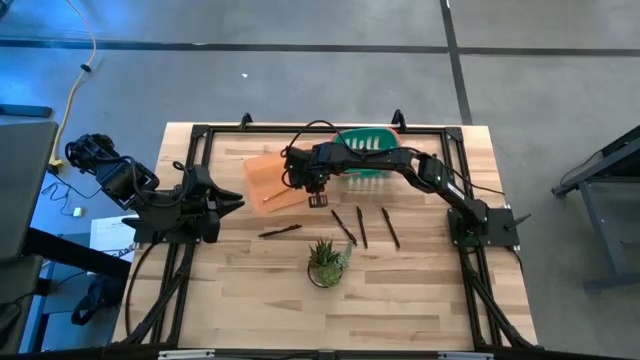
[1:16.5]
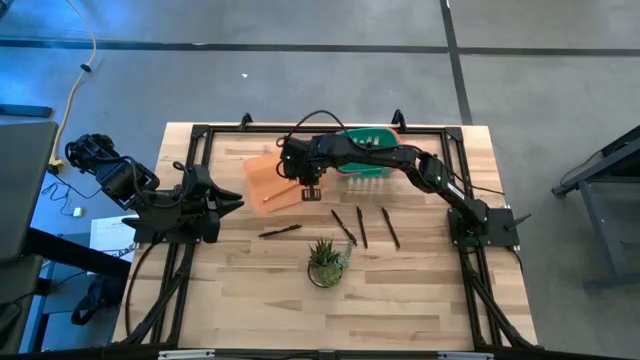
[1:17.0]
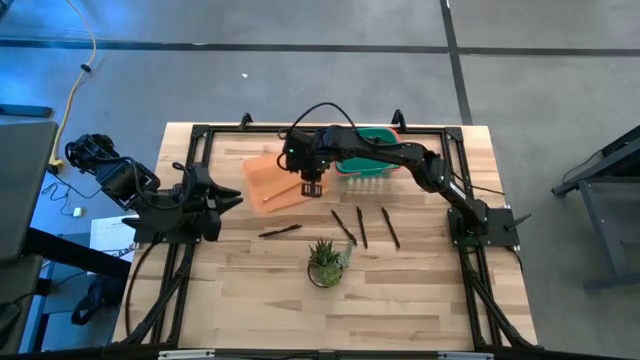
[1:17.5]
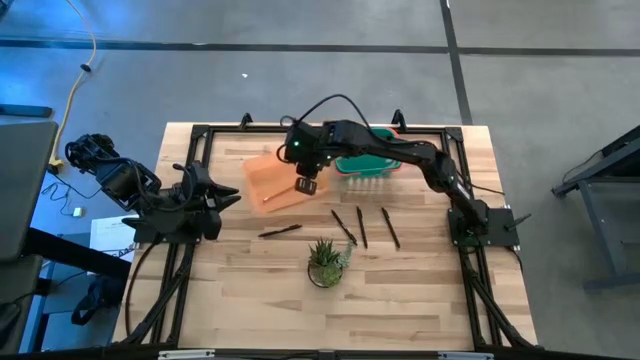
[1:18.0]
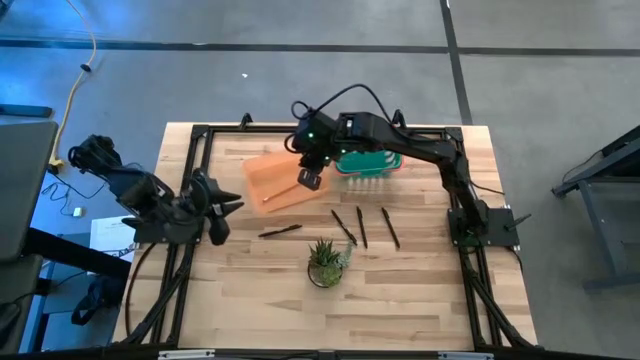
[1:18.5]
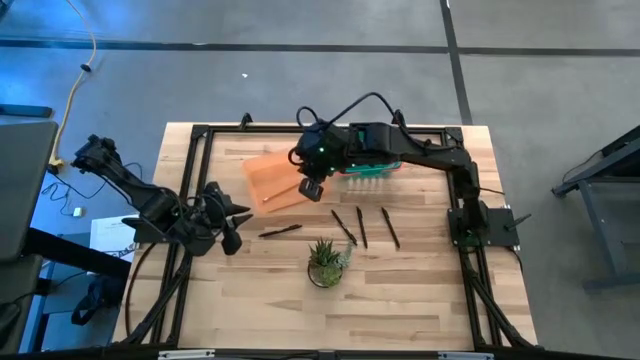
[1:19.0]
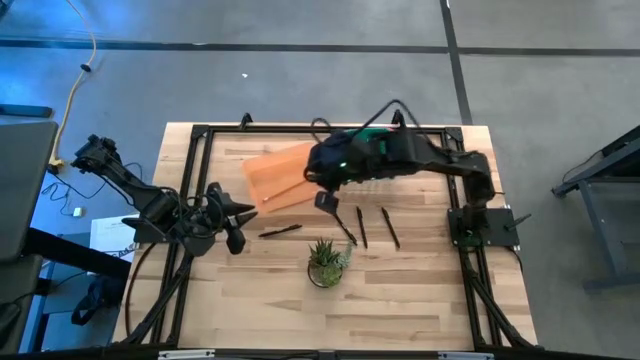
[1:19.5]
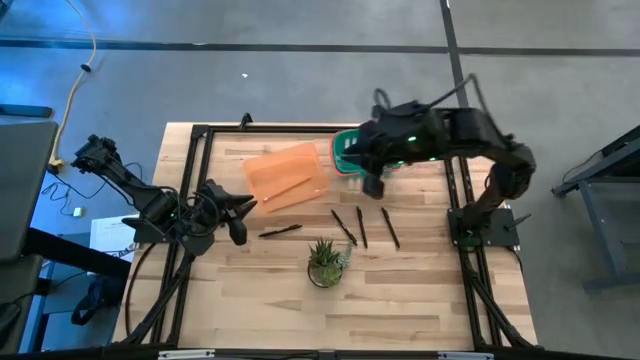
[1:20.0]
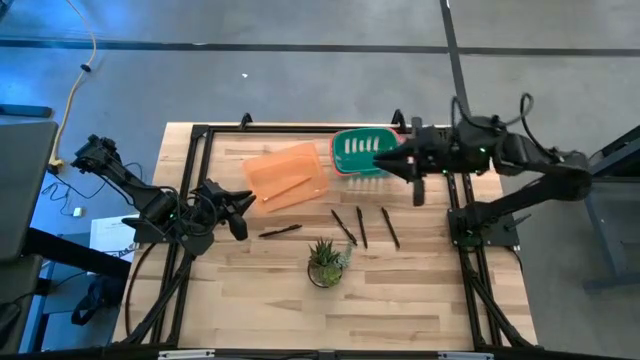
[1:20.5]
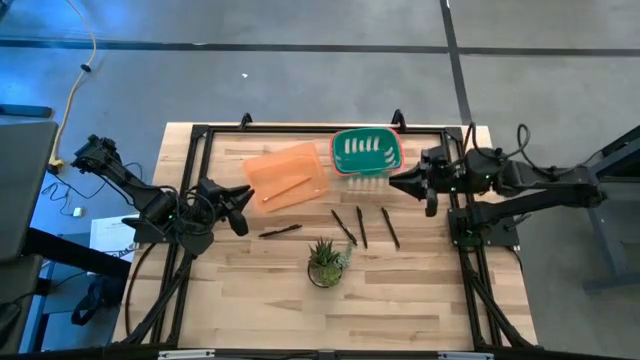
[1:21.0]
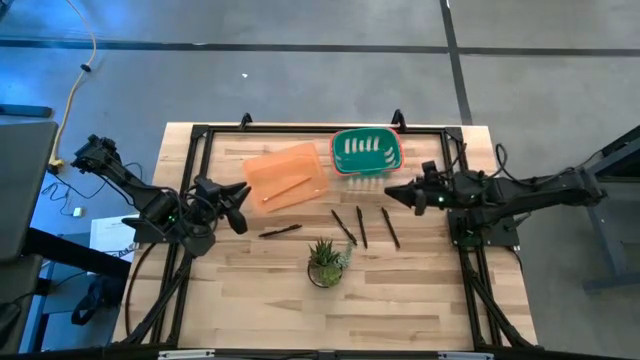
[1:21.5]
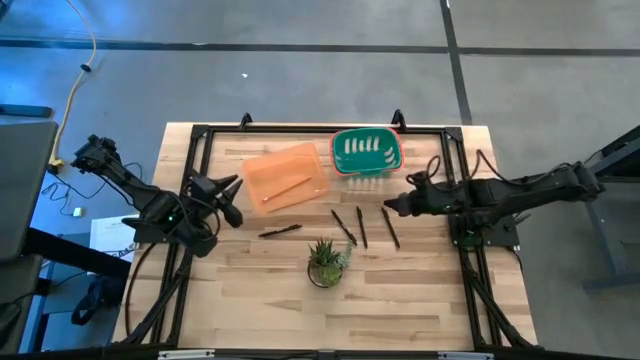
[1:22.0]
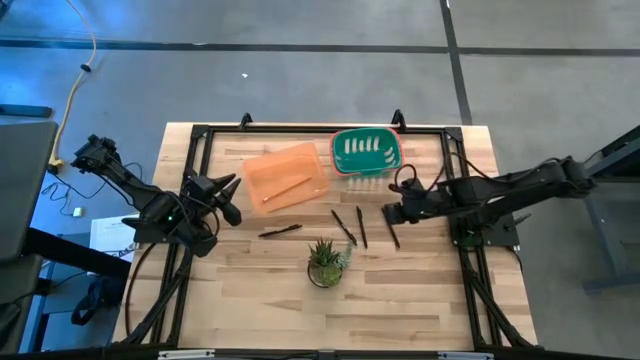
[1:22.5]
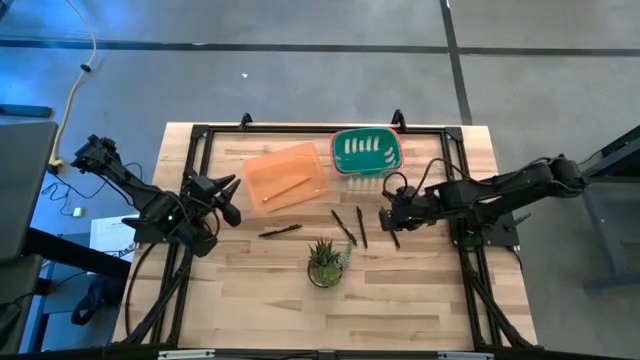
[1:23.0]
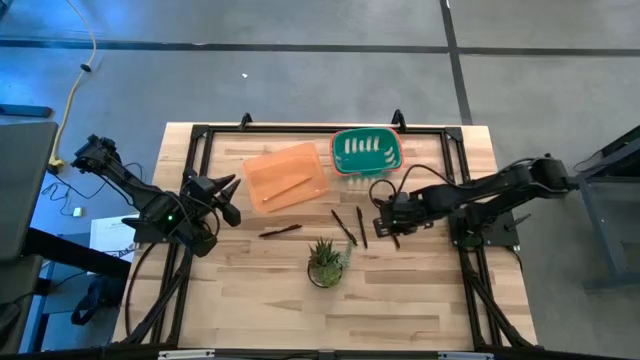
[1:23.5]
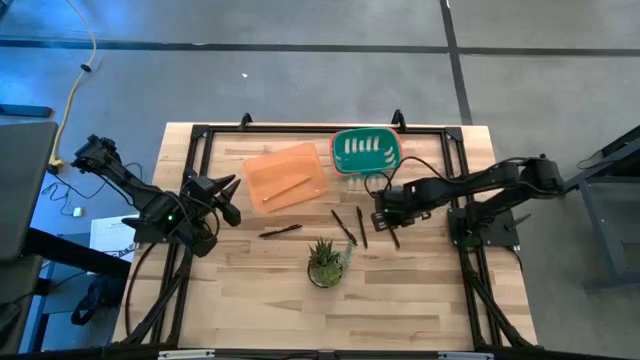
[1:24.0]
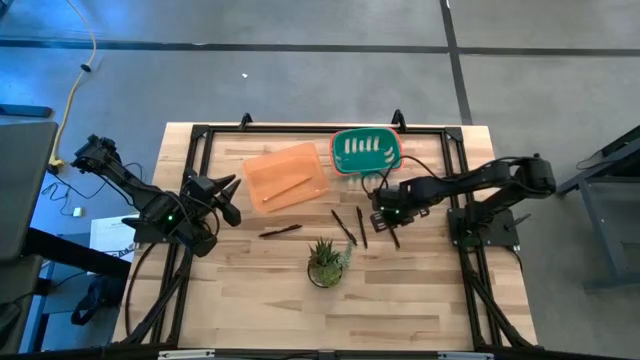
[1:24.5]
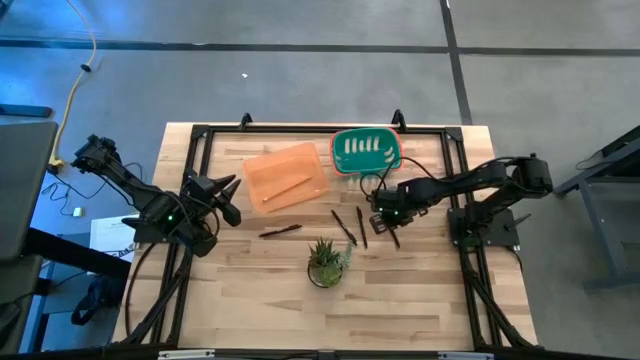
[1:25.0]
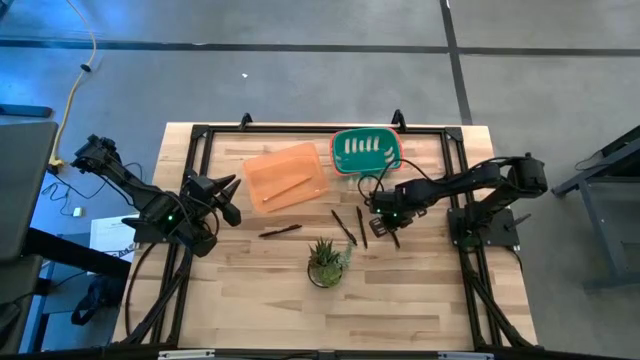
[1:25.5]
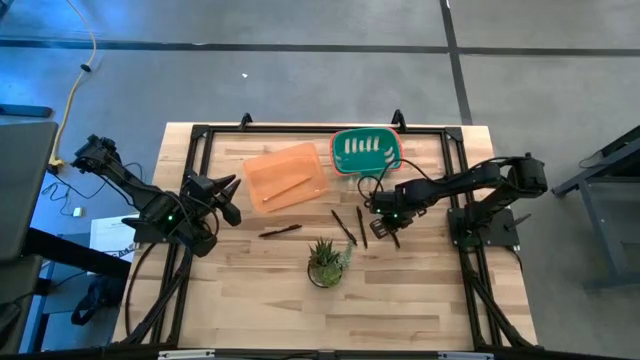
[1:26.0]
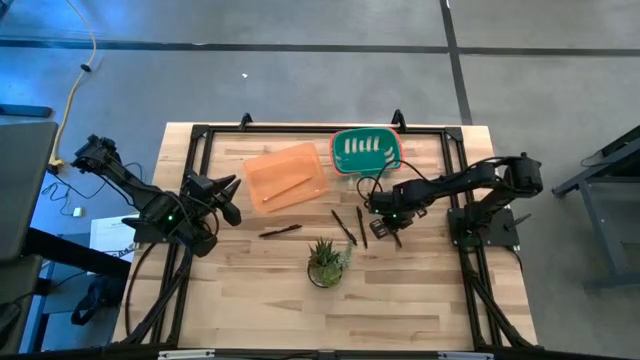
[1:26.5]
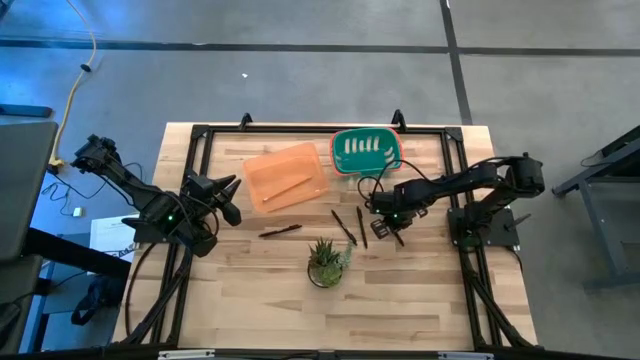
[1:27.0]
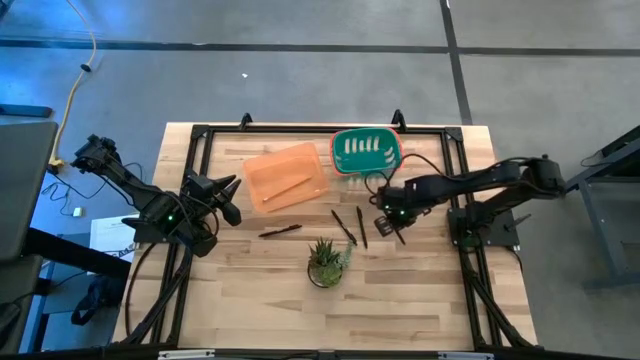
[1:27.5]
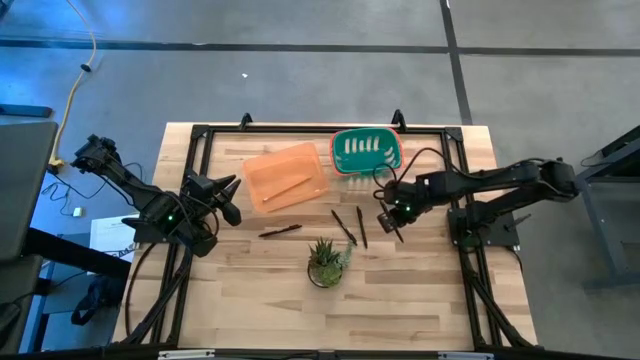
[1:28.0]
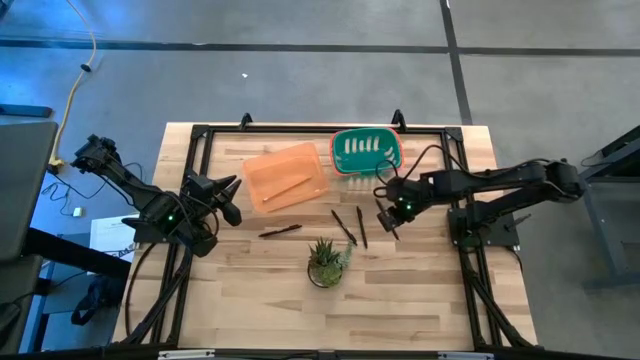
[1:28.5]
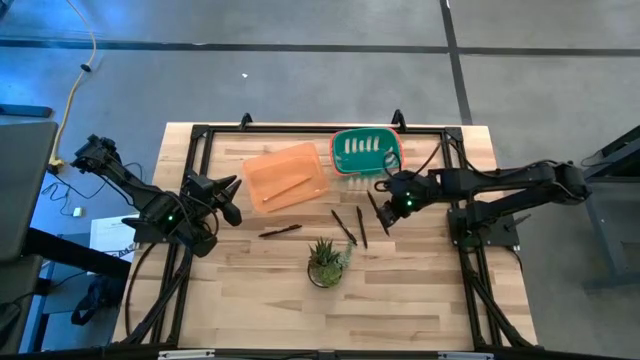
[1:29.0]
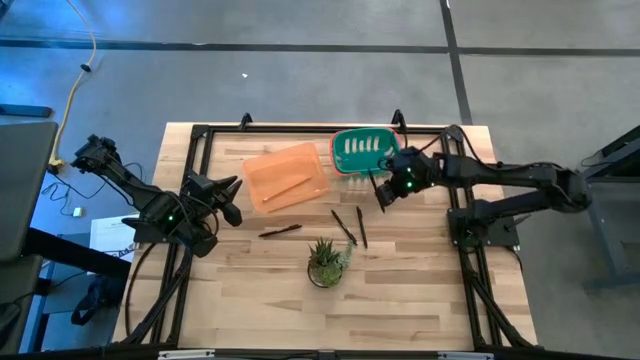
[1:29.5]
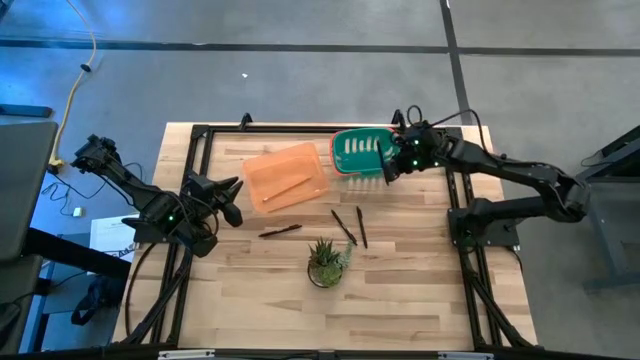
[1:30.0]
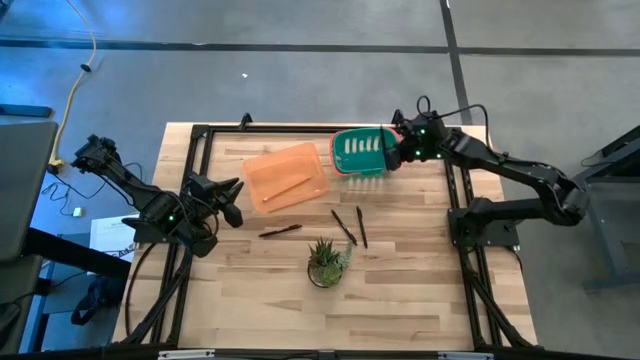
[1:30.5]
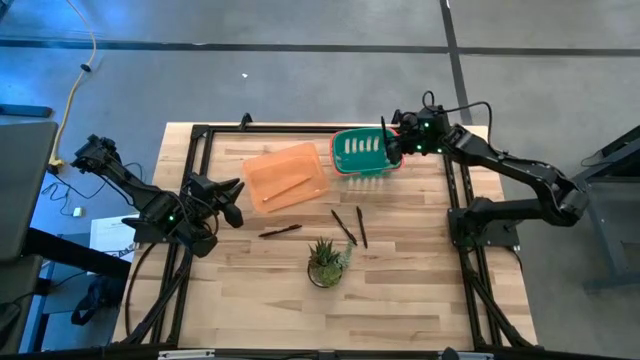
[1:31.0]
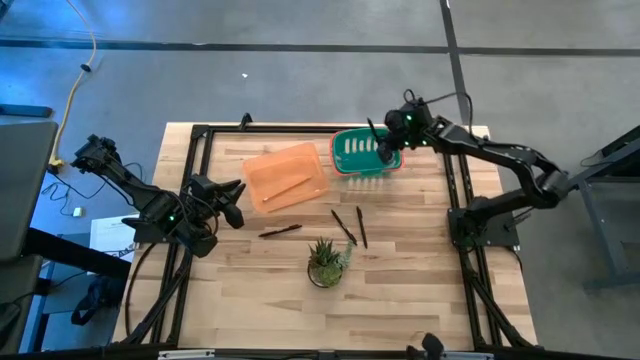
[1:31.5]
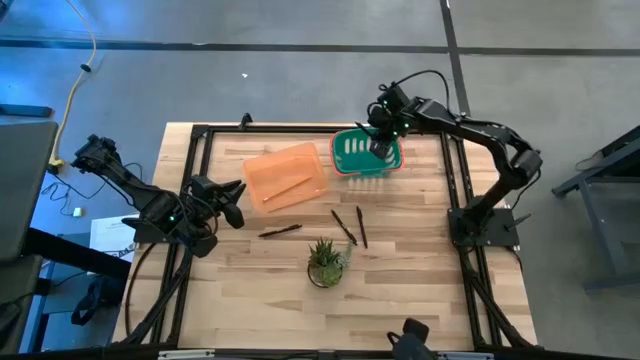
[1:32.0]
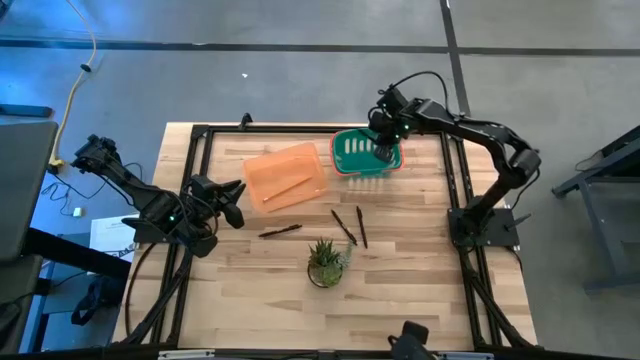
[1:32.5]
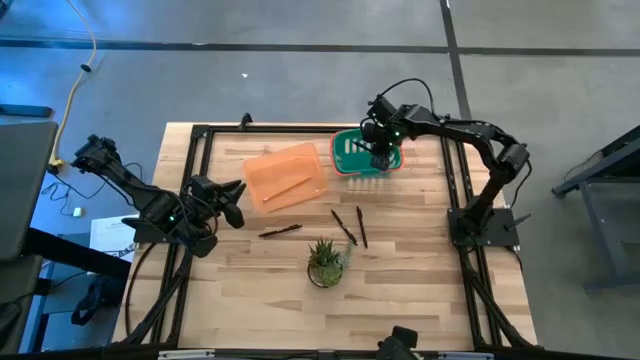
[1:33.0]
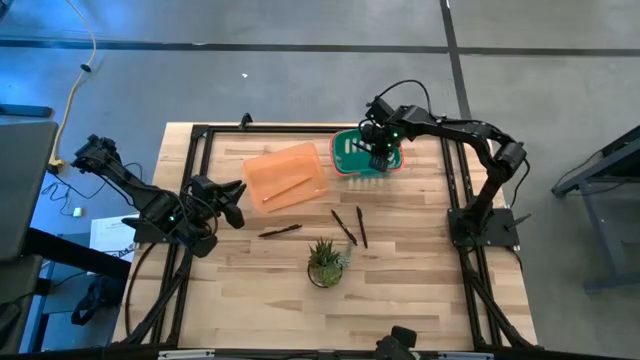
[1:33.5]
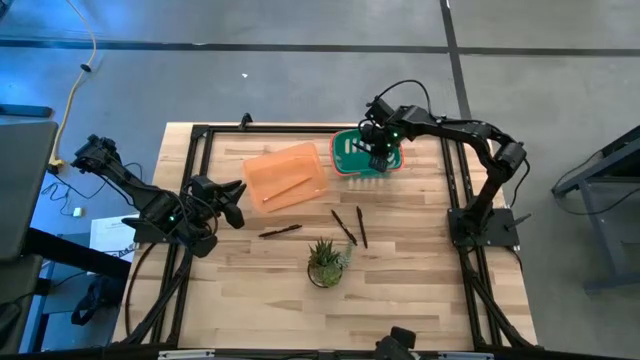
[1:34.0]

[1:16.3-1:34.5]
Task: Sort pens & pencils
Put the black pen into the green basket

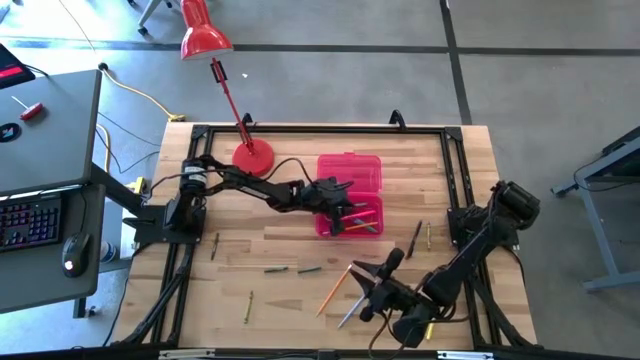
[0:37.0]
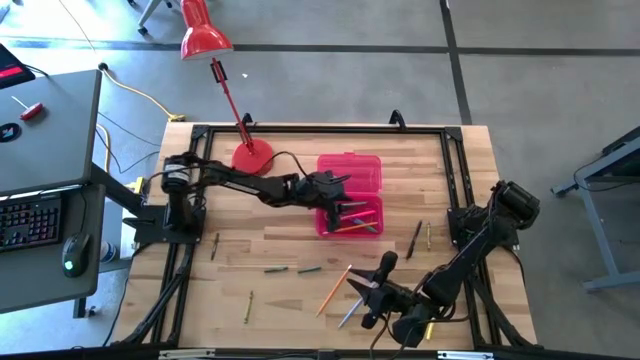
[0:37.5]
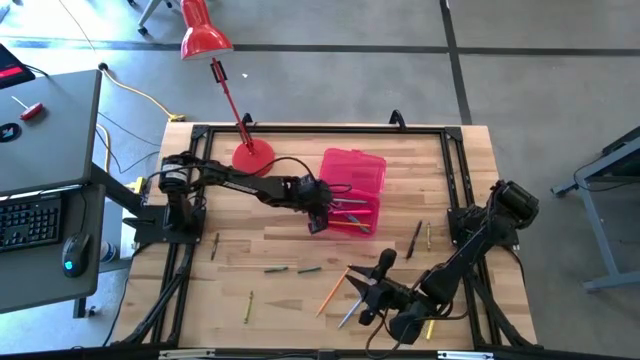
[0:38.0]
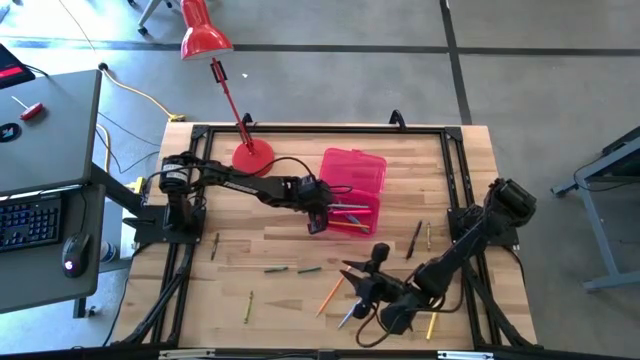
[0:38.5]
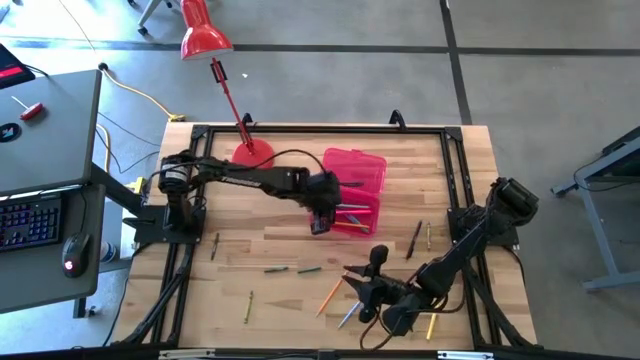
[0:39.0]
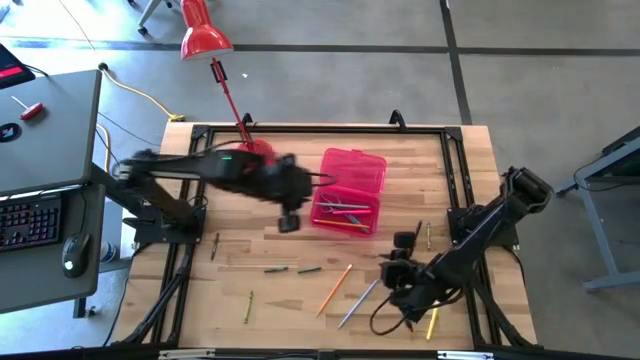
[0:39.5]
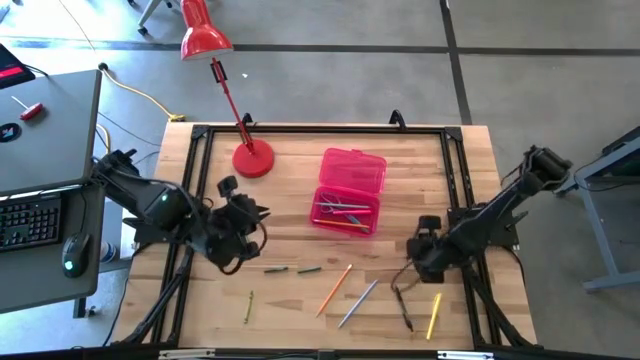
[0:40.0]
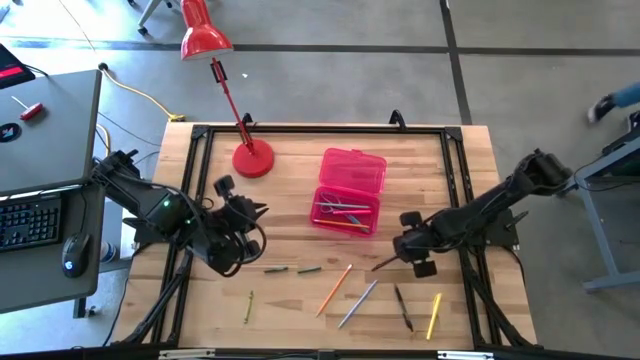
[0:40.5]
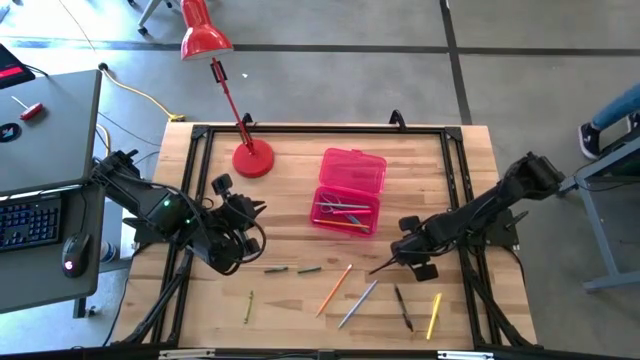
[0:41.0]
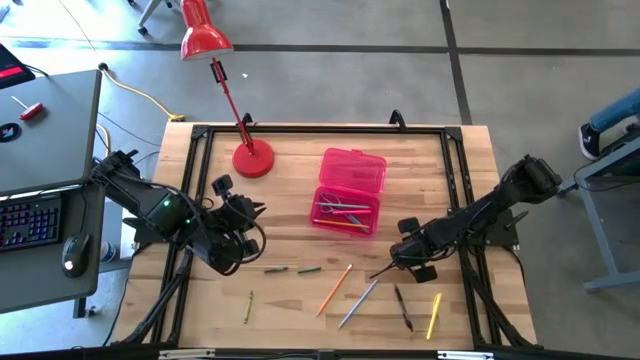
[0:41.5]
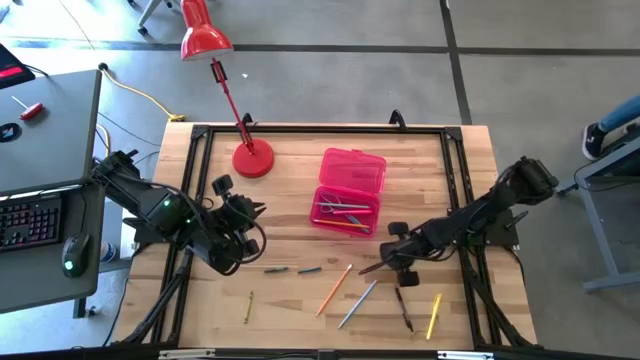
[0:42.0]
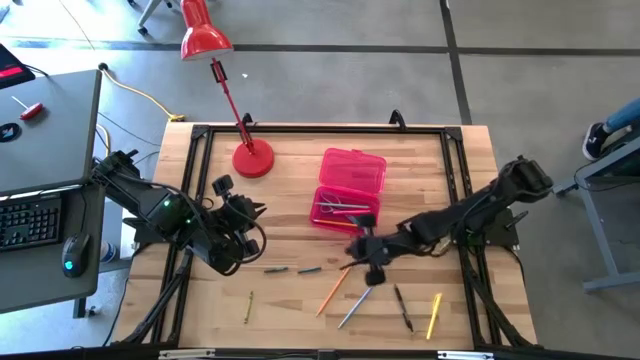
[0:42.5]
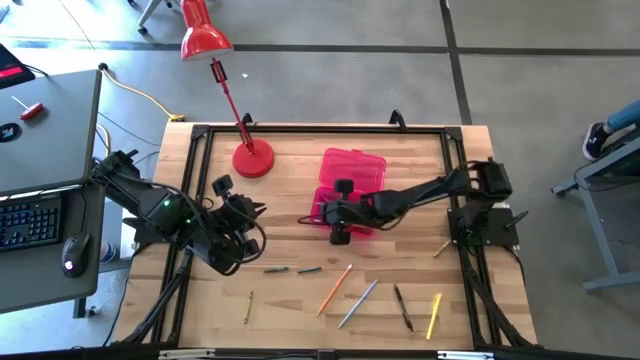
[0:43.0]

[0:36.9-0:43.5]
Task: Pick & place school supplies into a supply box
Put the top black pen into the red supply box
